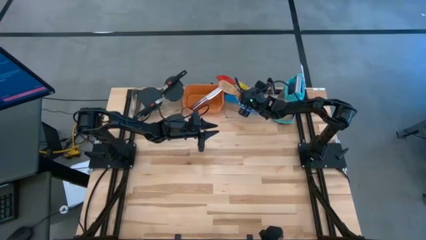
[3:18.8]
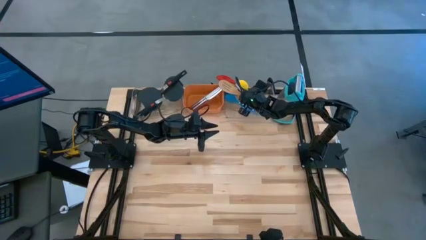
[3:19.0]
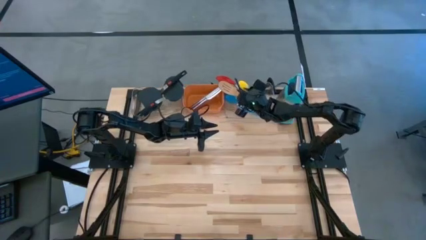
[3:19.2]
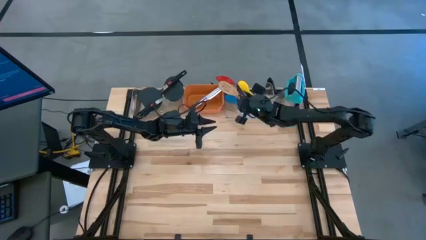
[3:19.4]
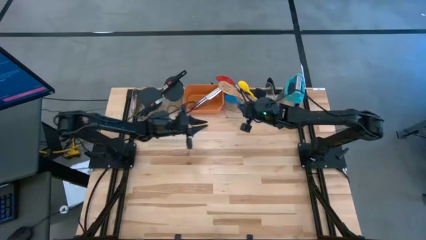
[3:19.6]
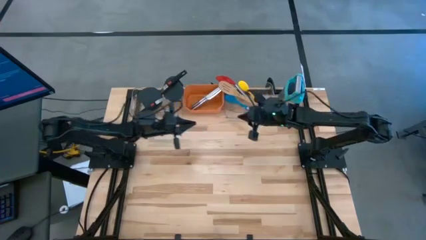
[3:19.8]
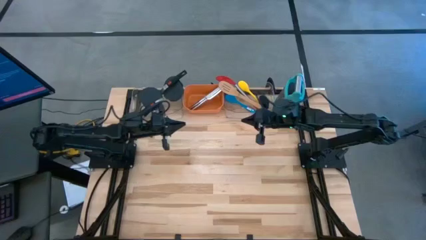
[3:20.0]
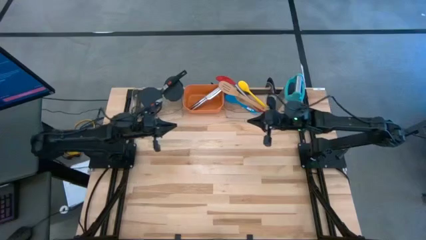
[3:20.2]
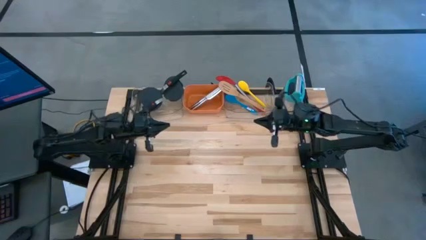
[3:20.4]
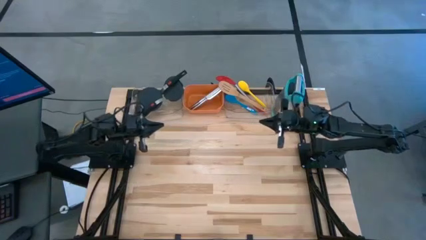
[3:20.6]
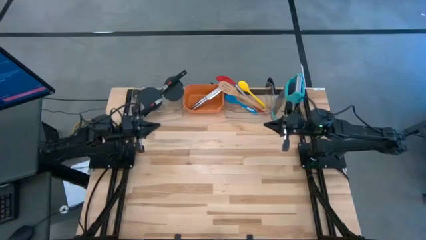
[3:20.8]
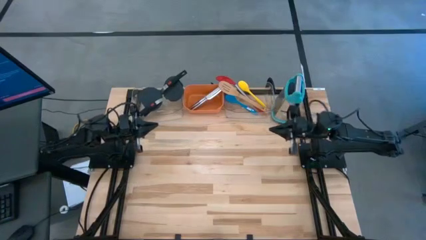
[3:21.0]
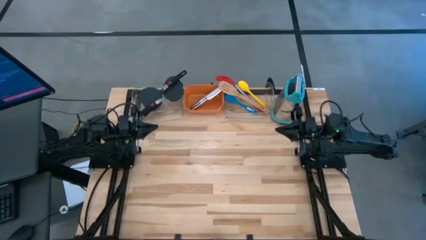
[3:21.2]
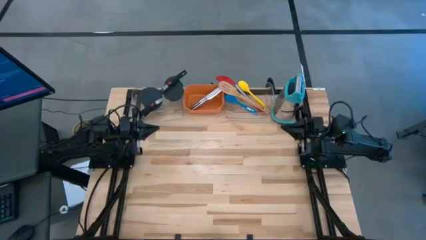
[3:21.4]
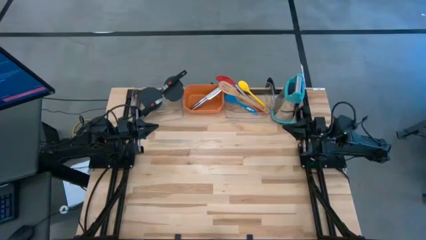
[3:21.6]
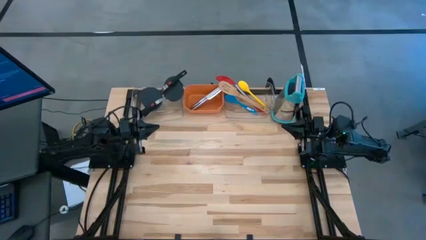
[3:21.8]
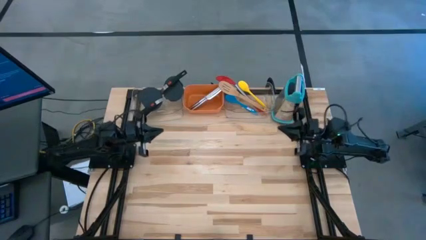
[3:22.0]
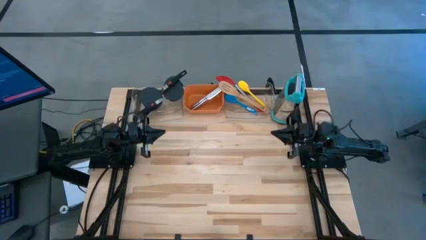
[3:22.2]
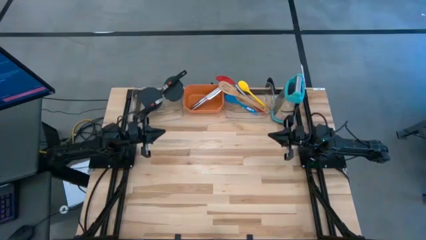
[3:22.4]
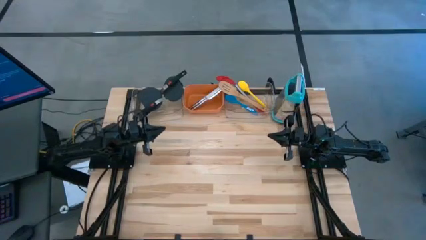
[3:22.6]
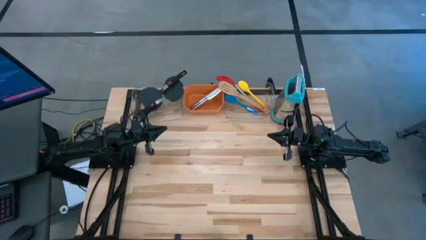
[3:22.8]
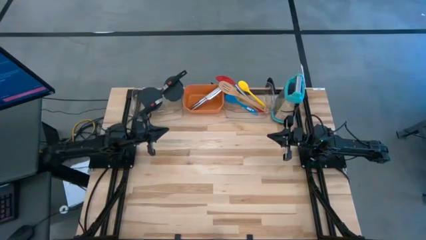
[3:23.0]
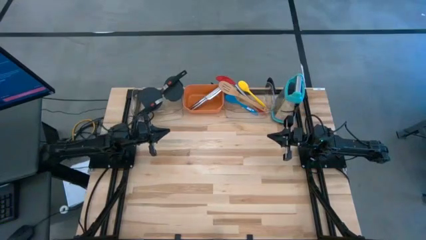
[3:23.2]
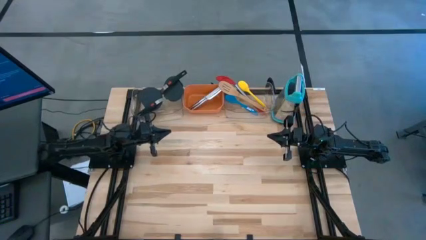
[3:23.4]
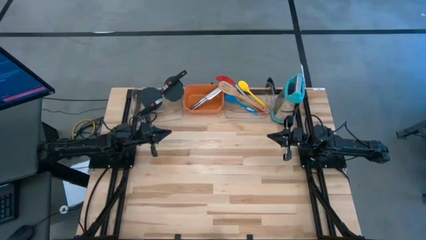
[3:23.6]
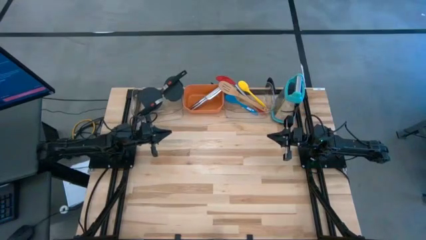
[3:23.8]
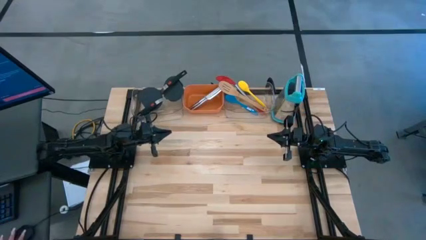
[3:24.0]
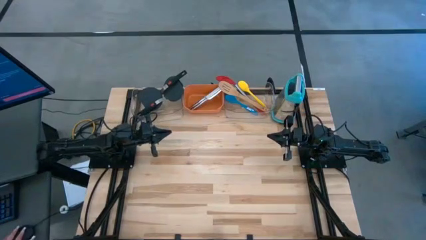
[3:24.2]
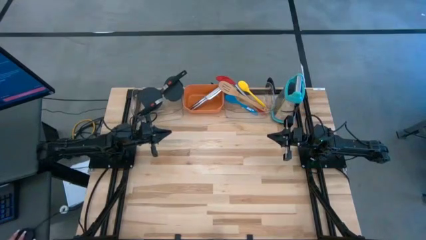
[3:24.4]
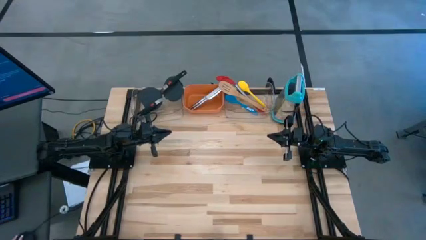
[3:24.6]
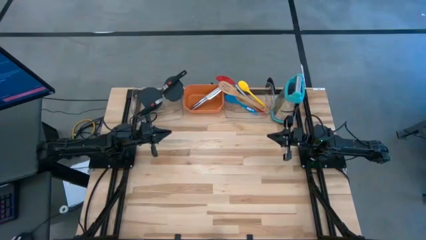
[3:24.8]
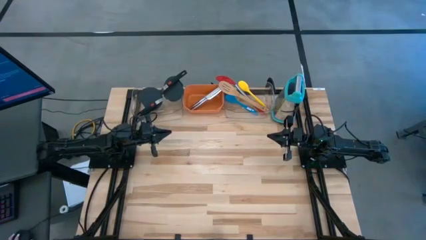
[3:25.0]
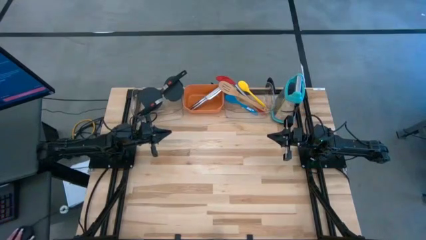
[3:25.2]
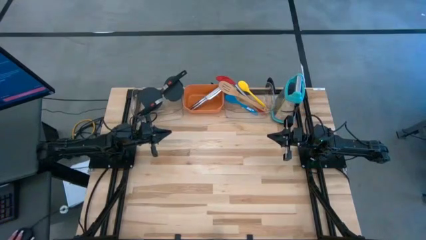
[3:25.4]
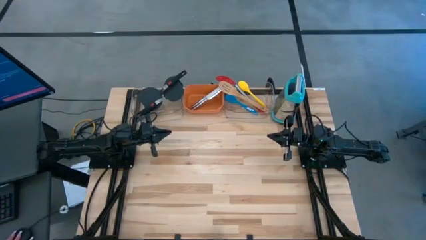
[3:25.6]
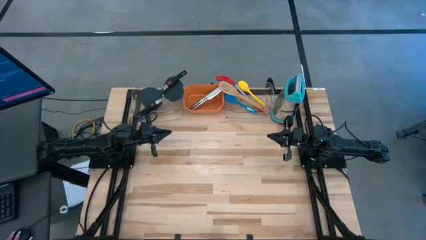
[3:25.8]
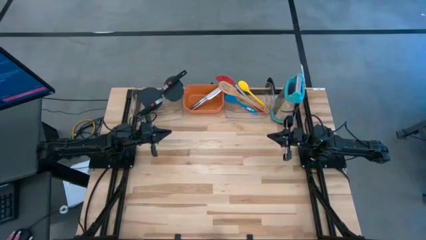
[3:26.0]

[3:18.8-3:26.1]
Task: Pick & Place Kitchen Items
Return to Home Position

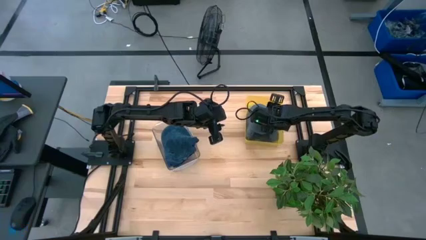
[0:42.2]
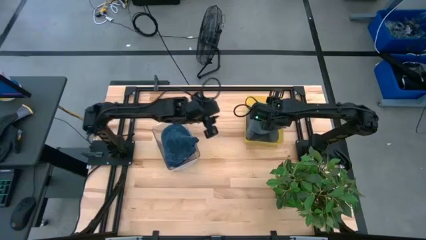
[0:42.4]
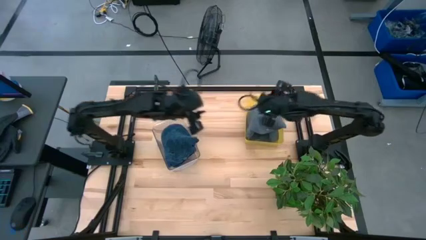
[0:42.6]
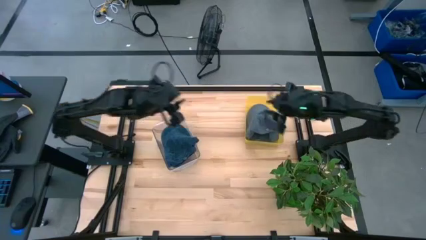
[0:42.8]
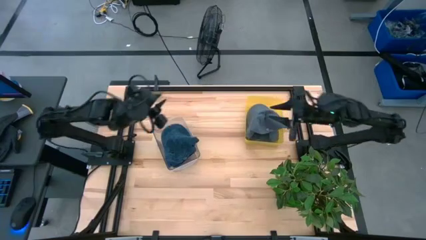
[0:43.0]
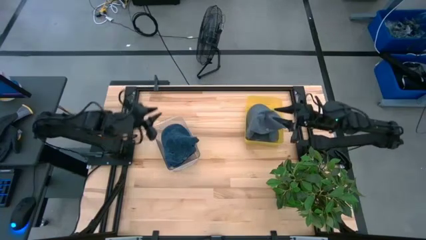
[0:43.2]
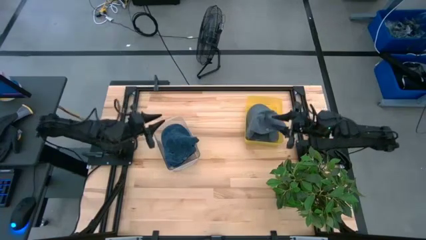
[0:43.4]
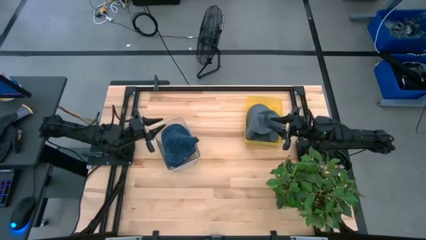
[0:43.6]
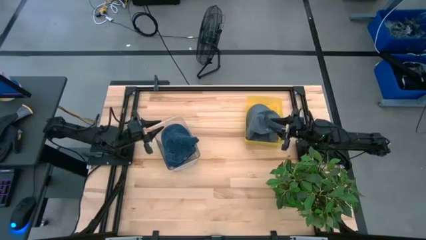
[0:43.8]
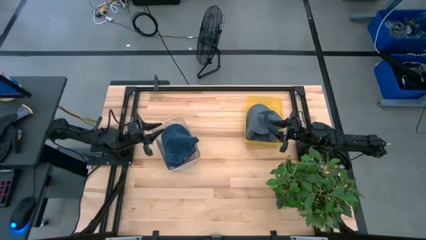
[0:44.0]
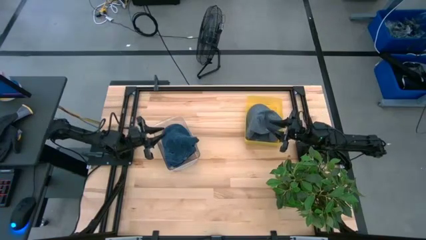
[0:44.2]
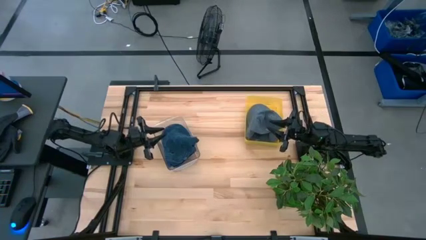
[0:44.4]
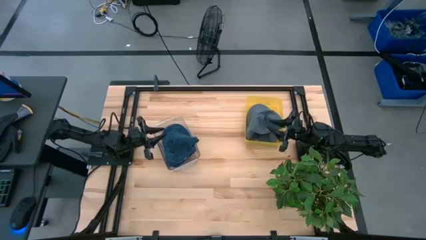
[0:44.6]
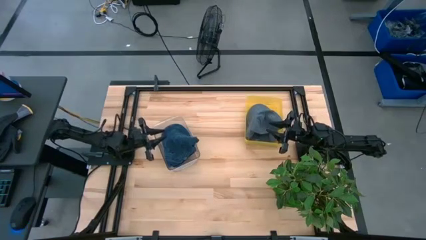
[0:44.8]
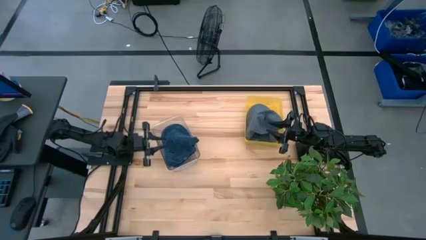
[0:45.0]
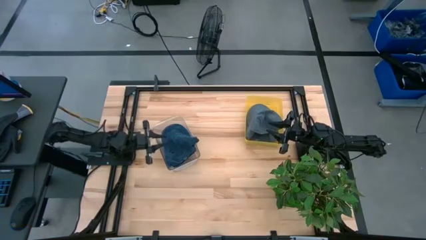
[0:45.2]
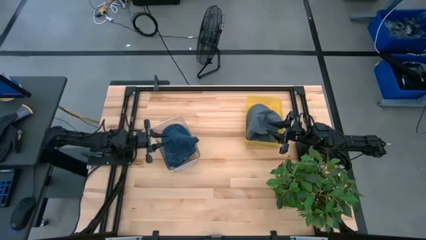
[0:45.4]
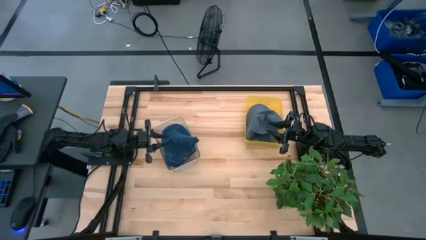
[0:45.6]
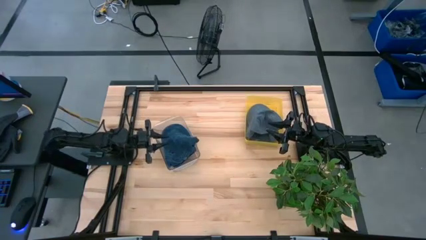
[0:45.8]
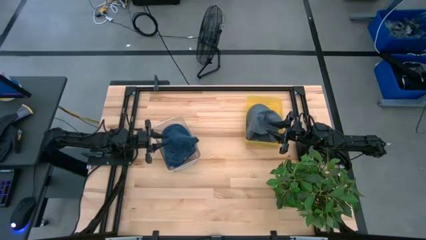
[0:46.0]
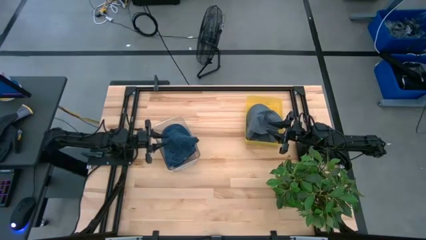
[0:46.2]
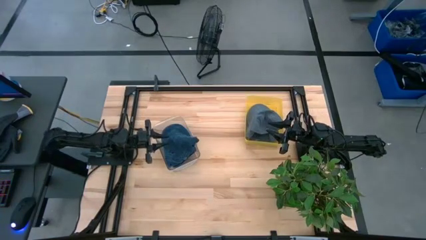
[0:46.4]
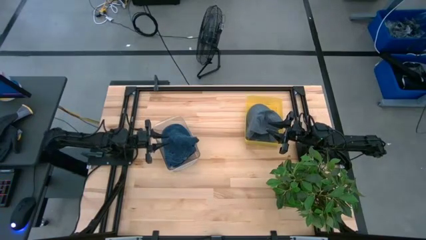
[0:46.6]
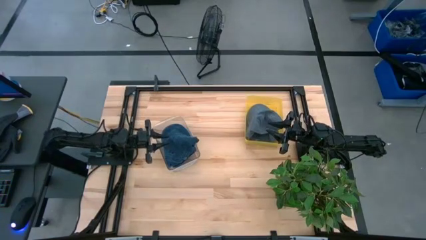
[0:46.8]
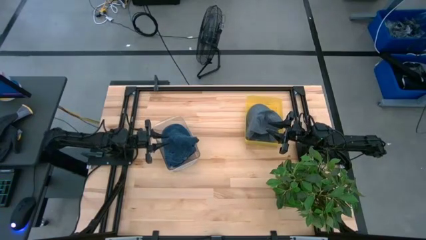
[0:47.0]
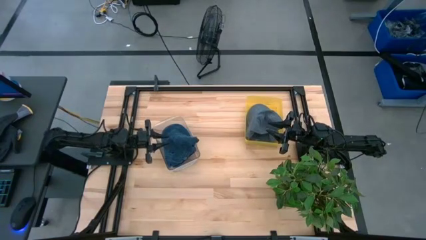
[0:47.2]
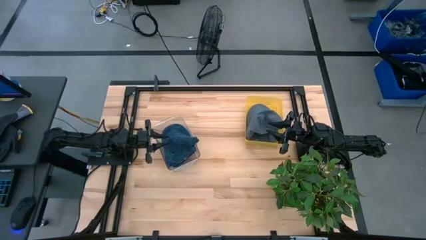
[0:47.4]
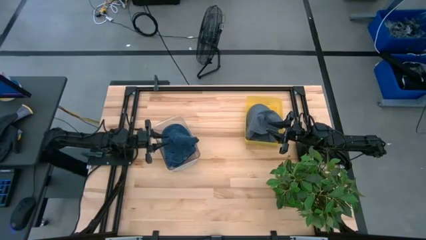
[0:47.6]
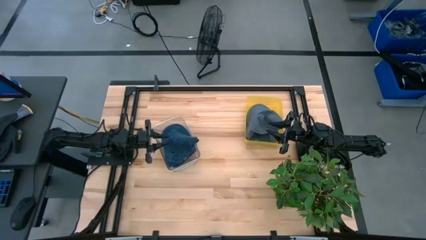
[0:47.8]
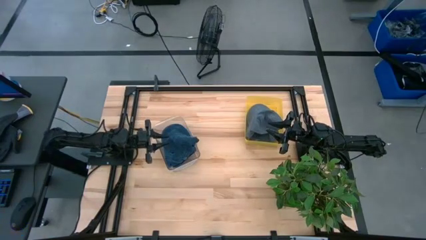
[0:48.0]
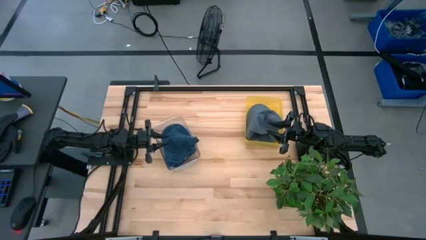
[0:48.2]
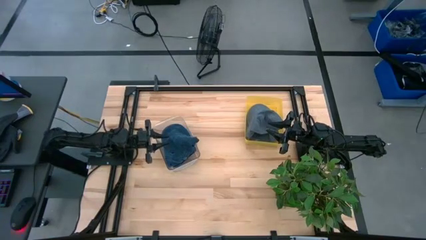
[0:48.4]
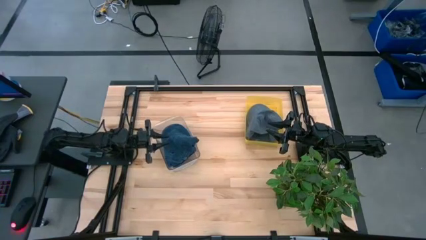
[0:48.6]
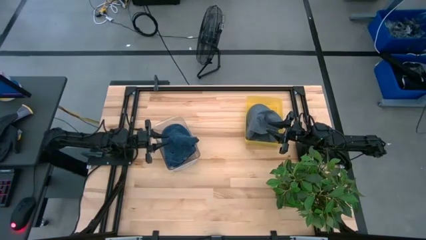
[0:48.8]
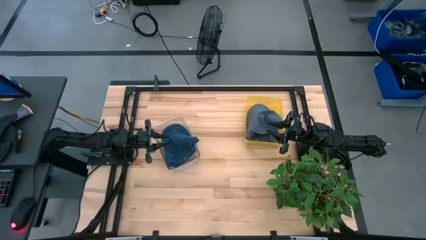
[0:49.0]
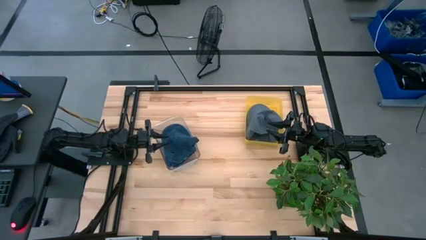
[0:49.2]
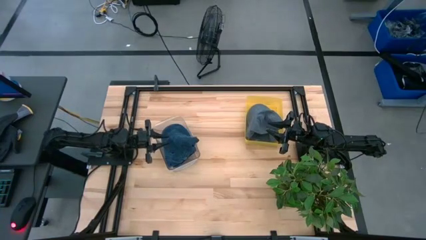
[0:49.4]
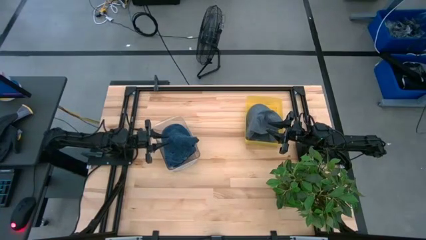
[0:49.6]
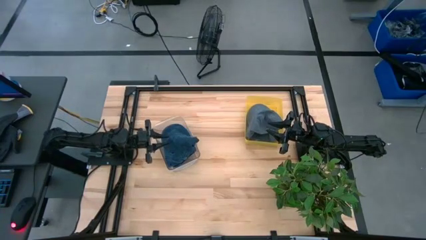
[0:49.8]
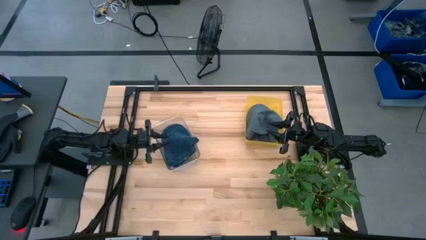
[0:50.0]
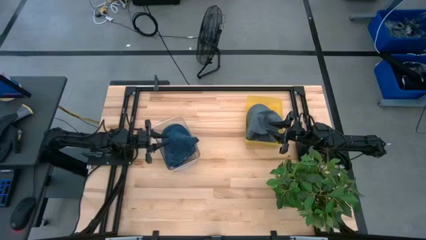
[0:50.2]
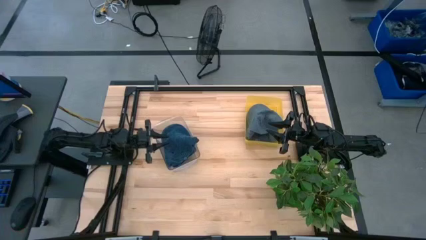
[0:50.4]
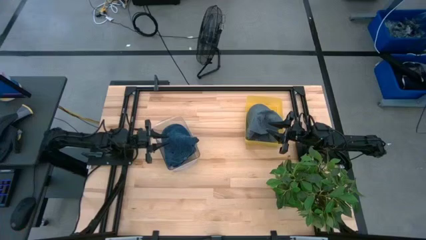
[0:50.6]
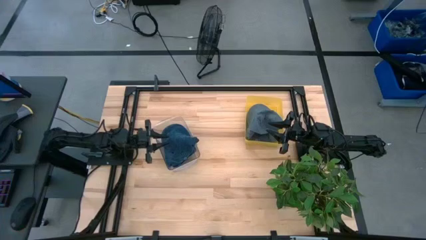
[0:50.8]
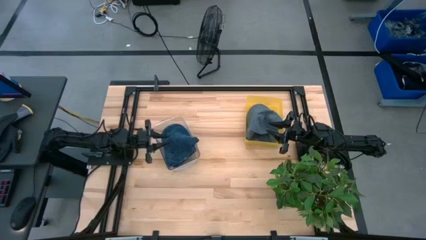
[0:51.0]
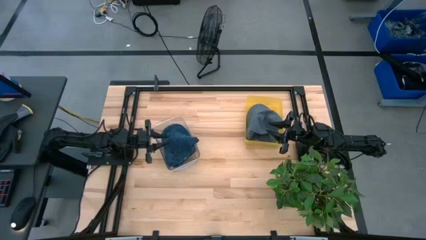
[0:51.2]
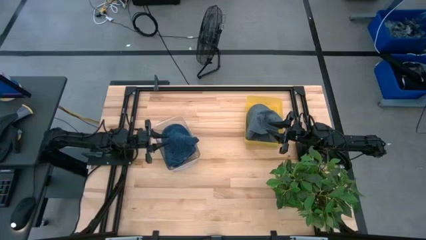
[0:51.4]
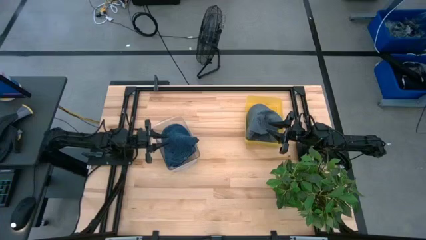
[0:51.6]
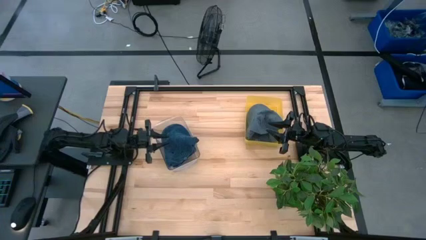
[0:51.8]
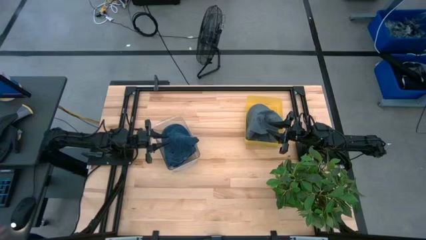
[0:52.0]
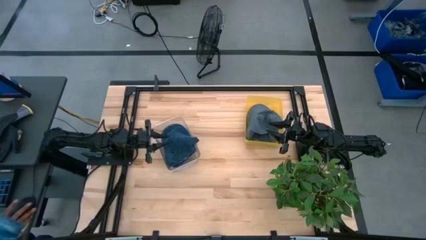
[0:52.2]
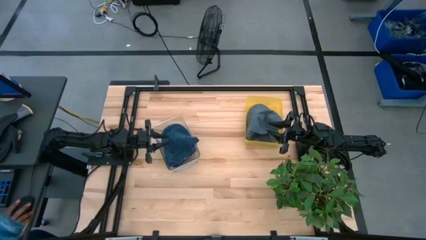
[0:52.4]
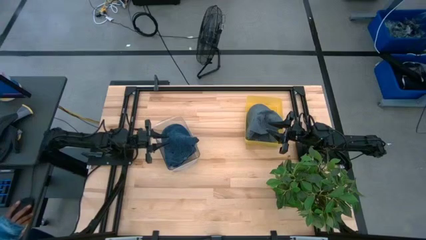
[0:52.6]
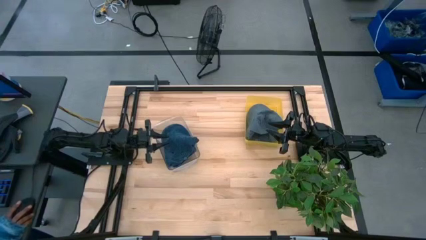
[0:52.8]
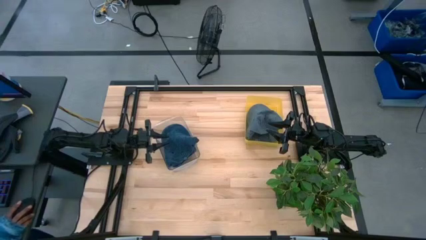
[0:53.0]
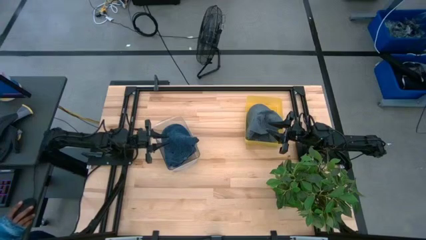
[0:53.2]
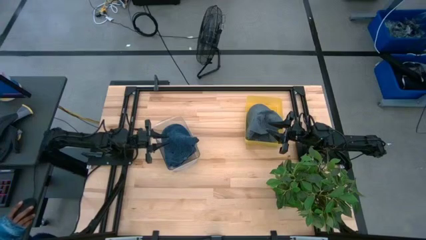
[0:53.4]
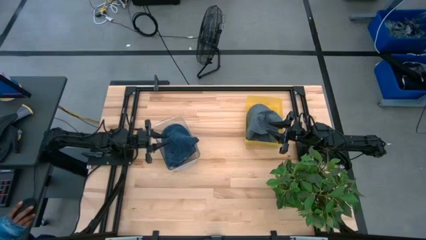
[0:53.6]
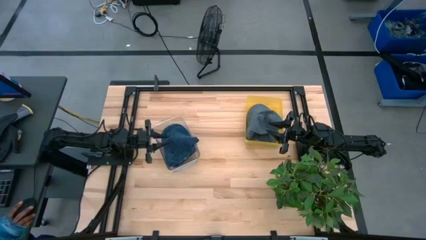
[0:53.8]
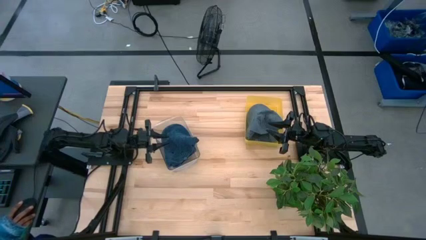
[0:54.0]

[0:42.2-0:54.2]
Task: Pick & Place hat
Return to Home Position
